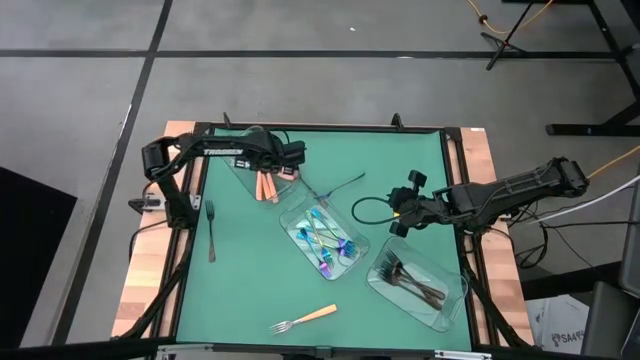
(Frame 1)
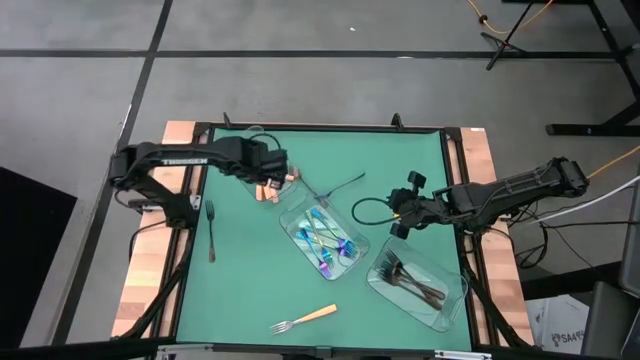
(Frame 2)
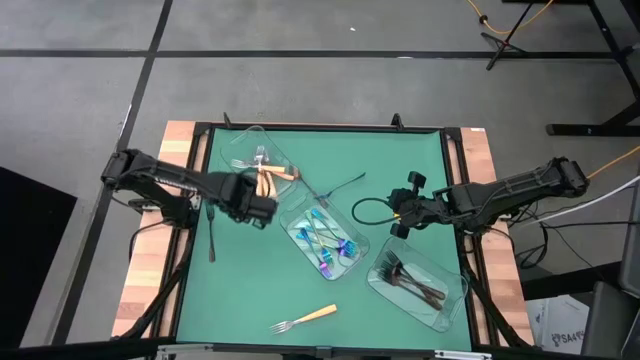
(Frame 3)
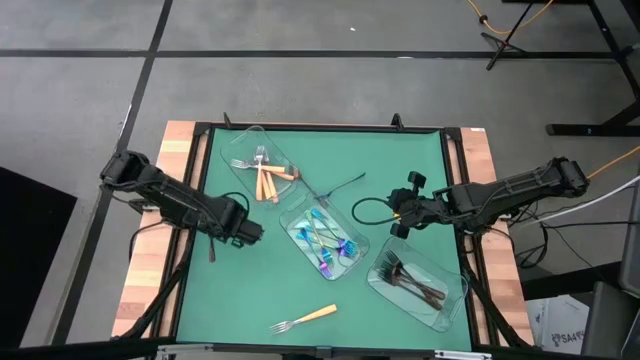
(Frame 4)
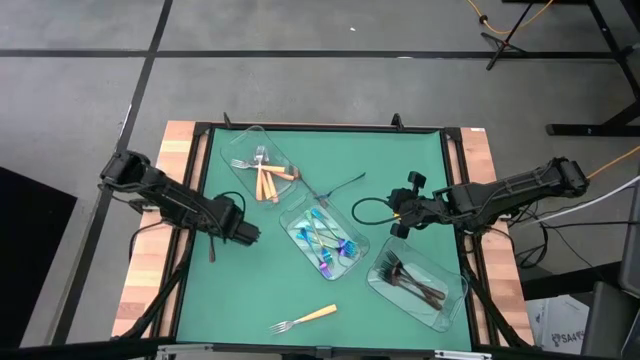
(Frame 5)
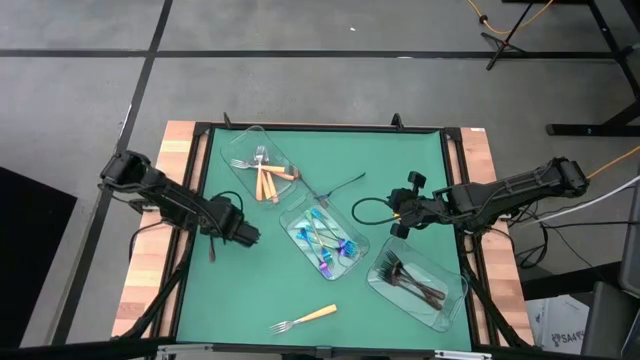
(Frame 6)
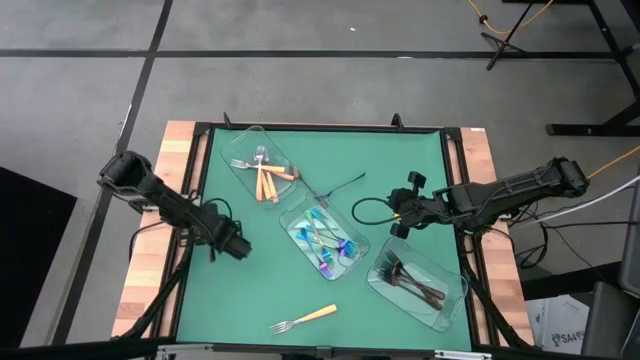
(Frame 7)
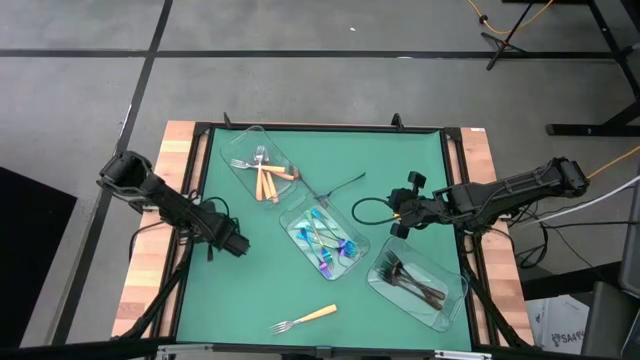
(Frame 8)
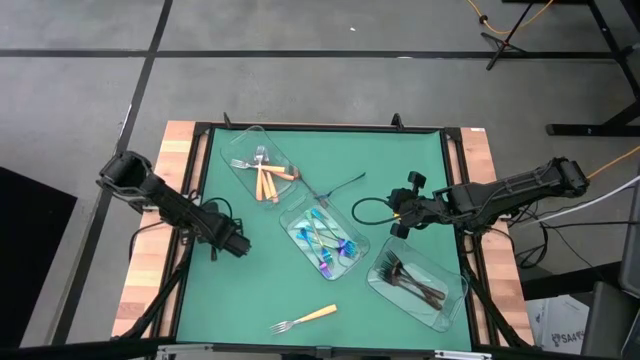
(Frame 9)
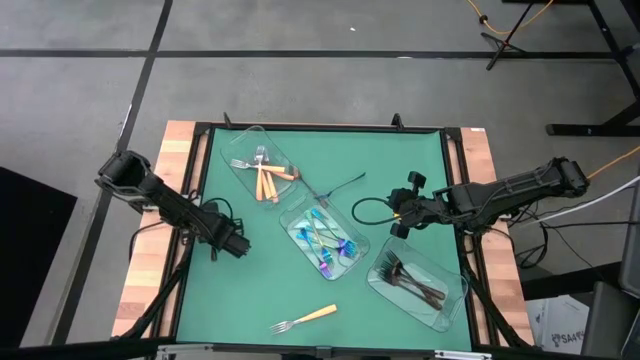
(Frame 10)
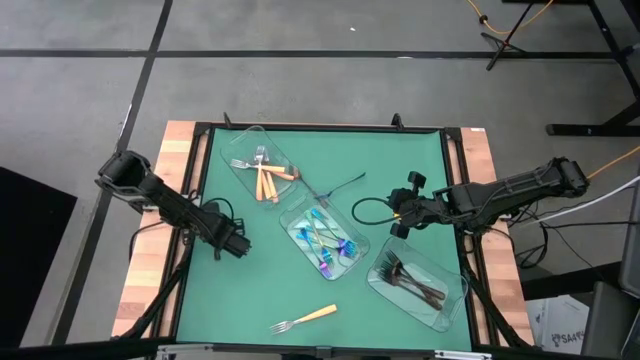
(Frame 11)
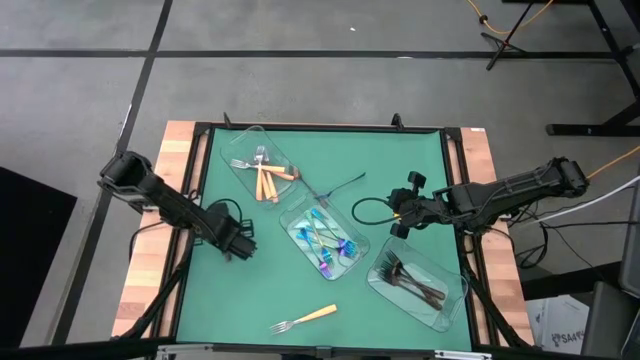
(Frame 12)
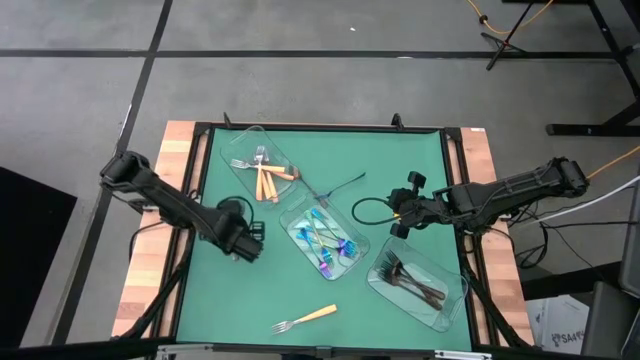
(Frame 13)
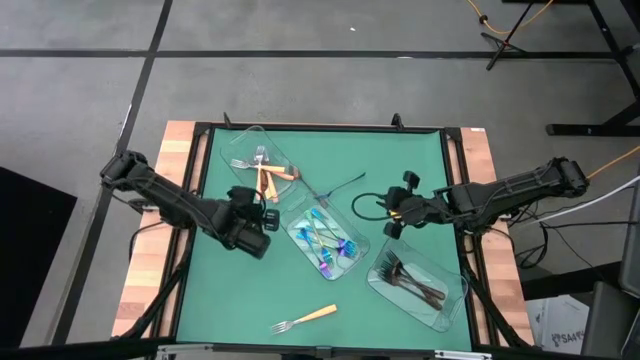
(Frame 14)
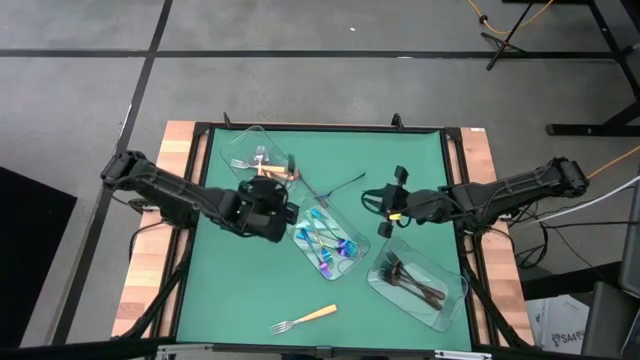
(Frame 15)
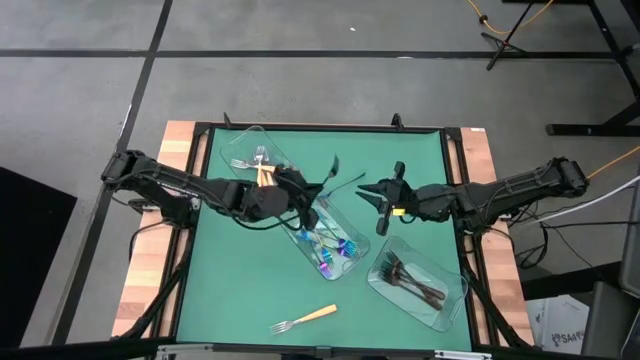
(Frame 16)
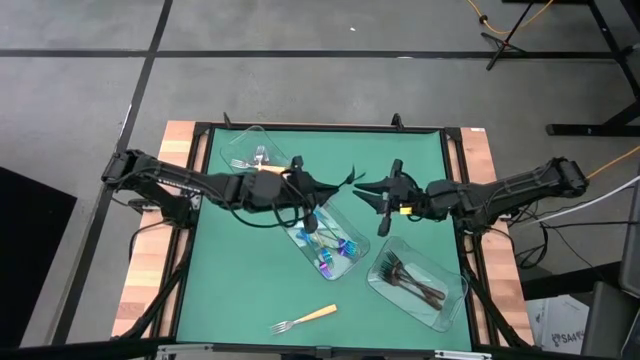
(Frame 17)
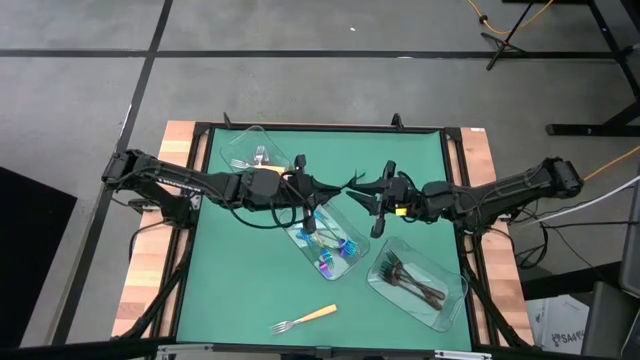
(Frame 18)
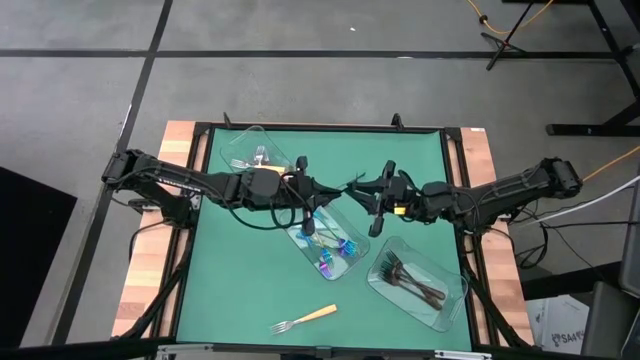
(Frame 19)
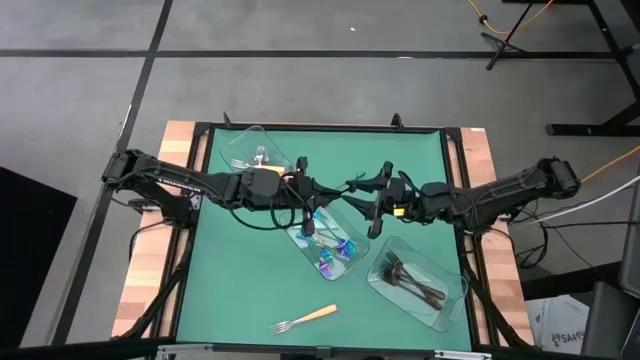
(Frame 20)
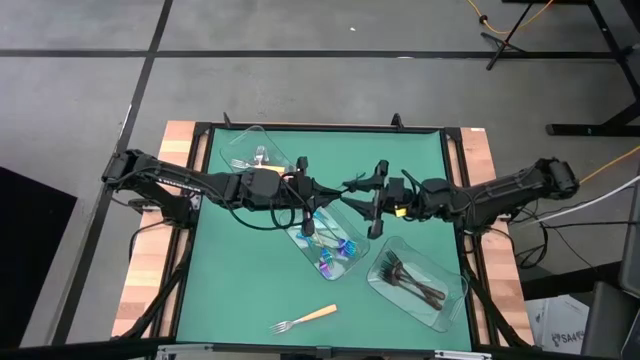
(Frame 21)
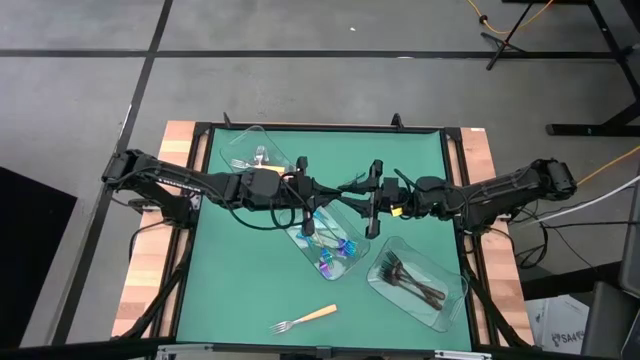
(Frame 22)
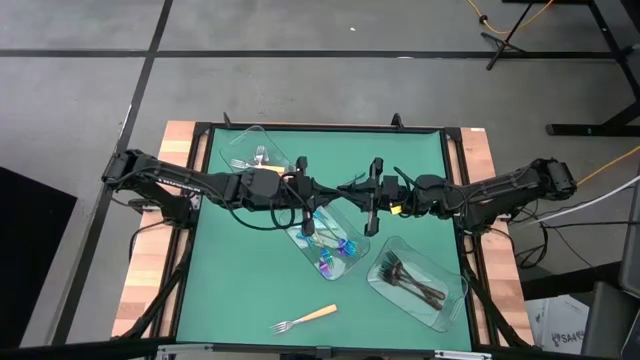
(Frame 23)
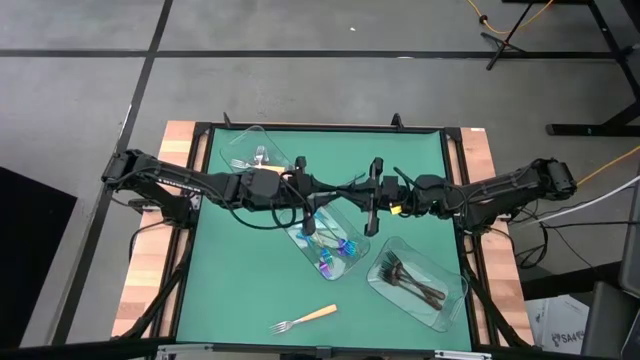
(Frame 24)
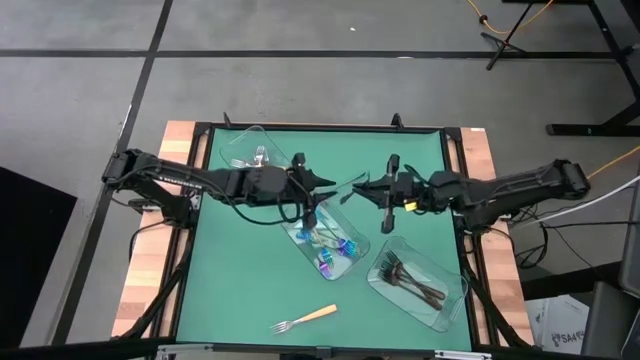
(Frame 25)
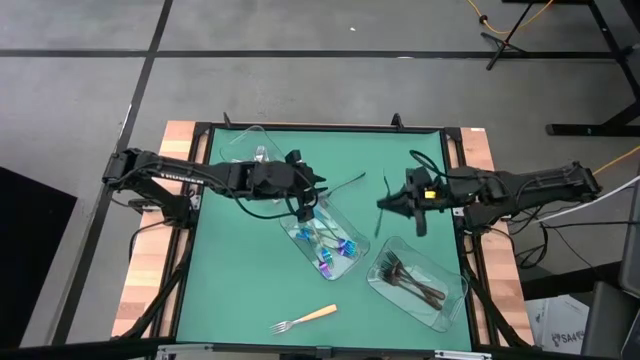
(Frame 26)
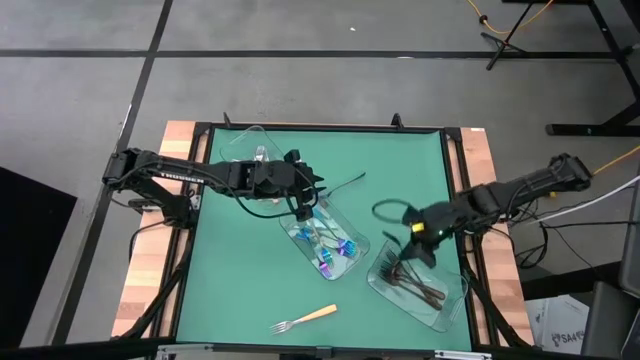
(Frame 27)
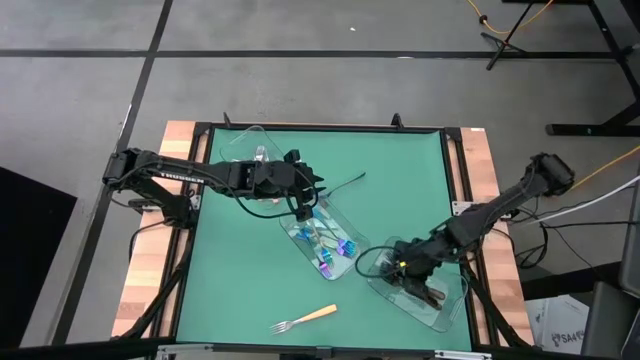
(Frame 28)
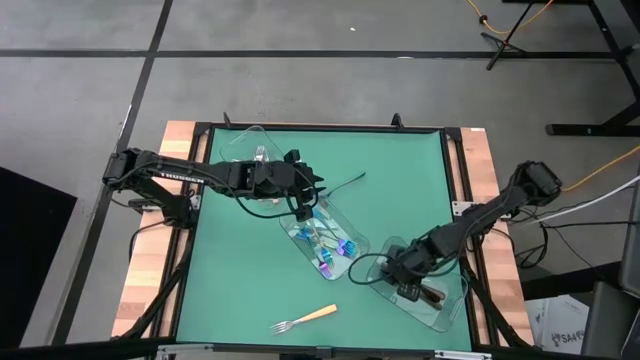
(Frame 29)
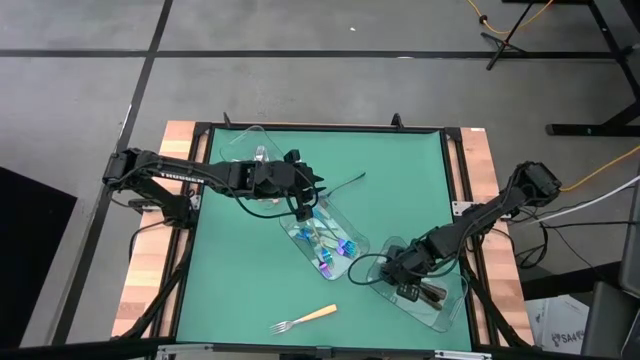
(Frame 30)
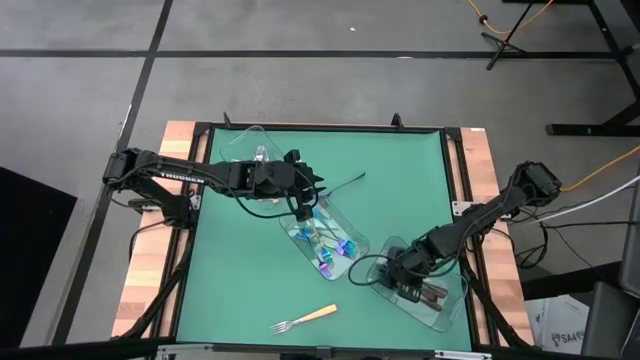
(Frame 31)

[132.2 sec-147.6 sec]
Task: Sort silverware by color (type)
Put black fork into the bottom transparent bin

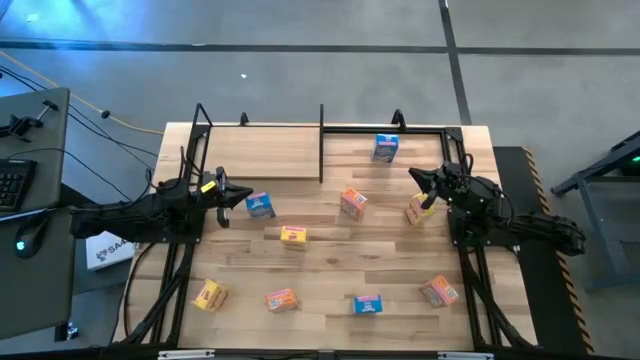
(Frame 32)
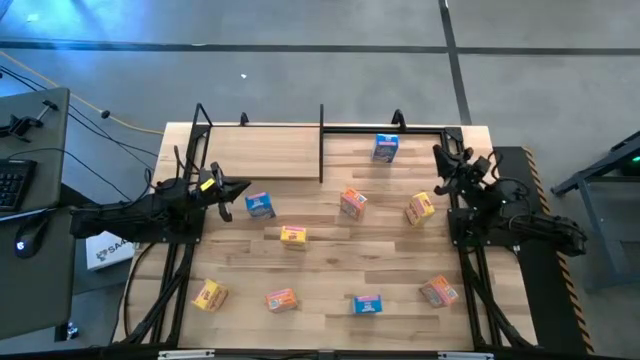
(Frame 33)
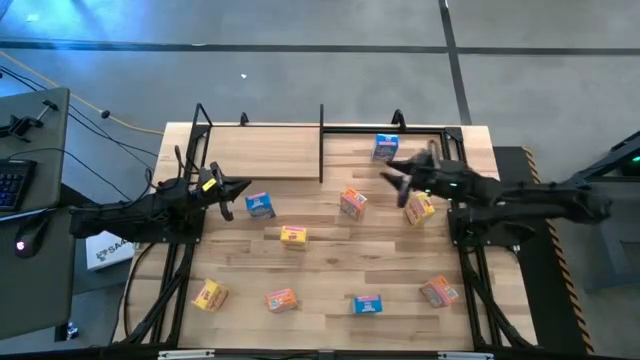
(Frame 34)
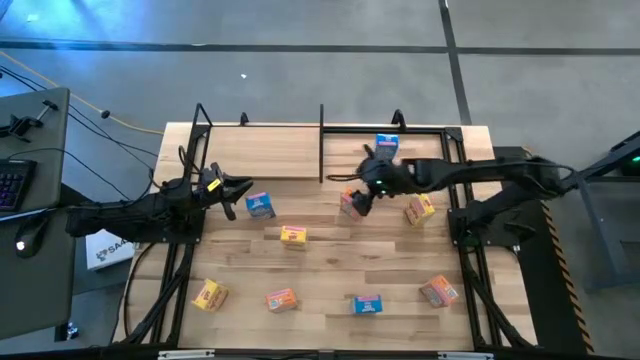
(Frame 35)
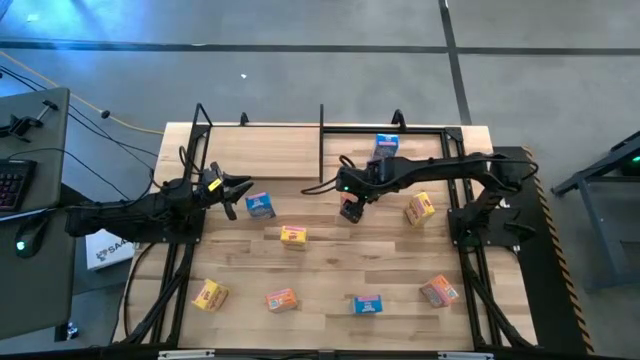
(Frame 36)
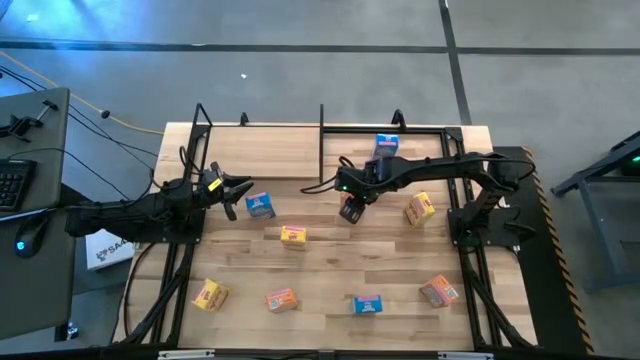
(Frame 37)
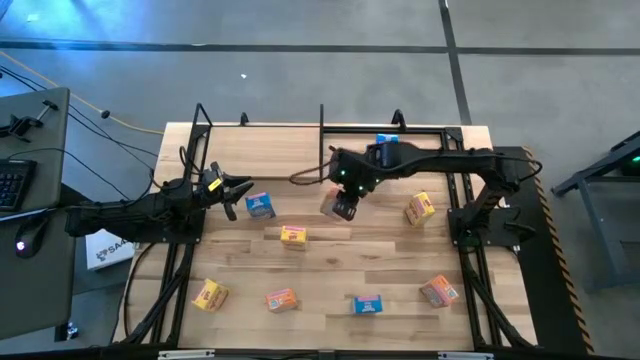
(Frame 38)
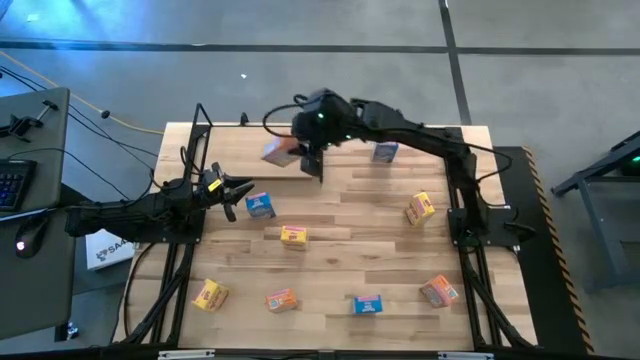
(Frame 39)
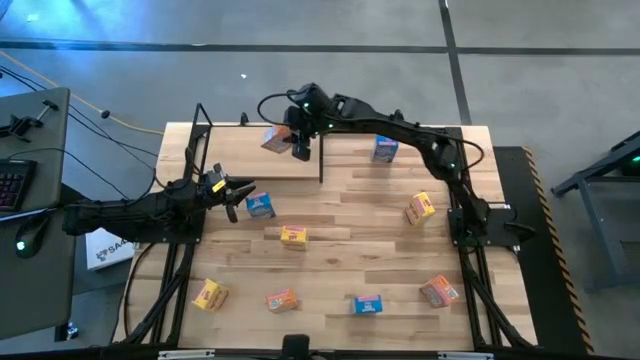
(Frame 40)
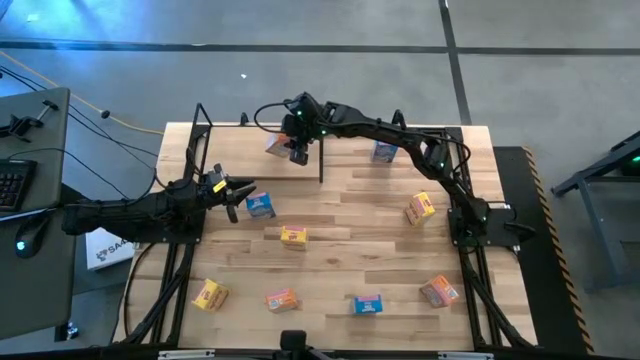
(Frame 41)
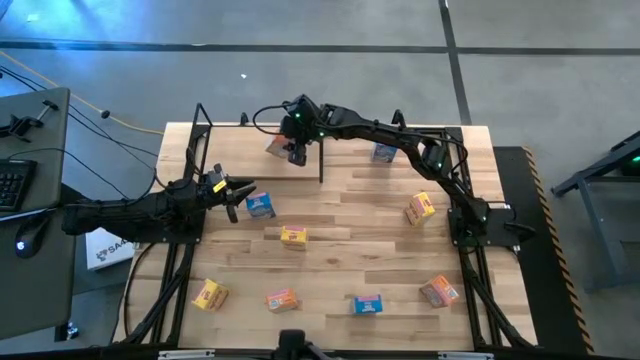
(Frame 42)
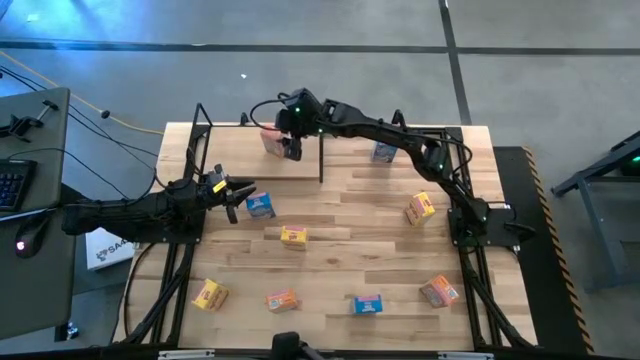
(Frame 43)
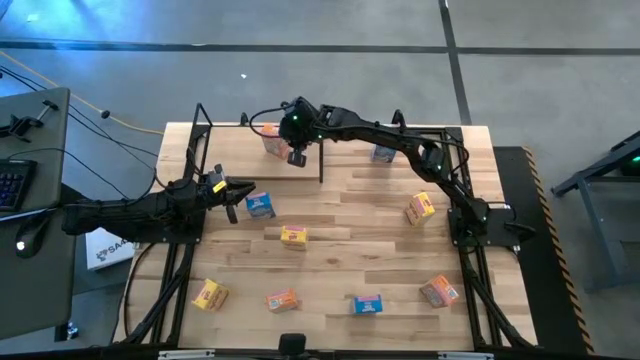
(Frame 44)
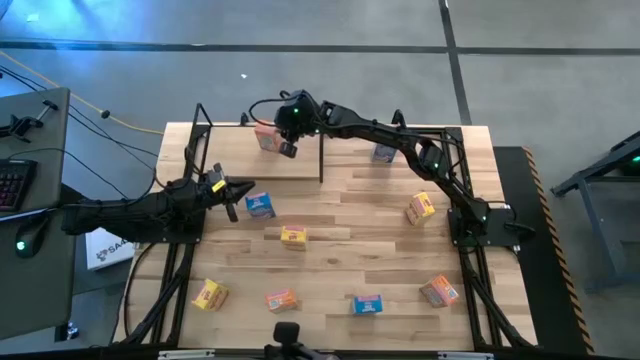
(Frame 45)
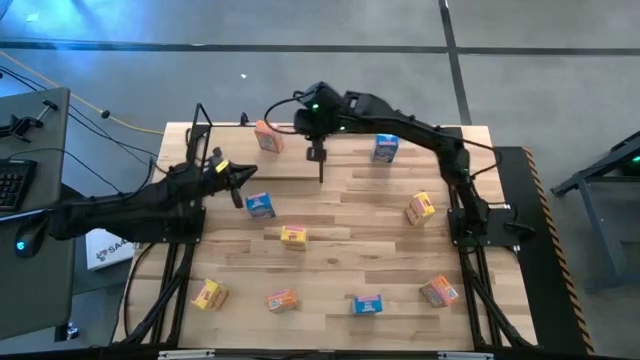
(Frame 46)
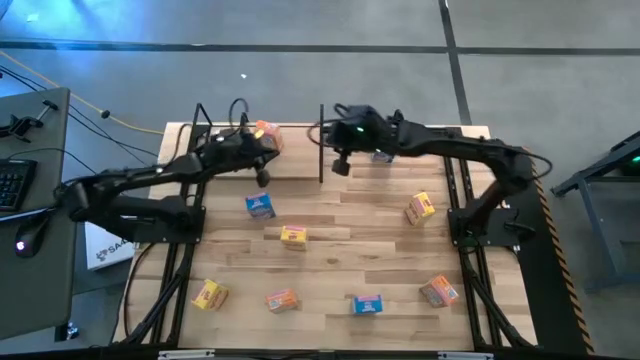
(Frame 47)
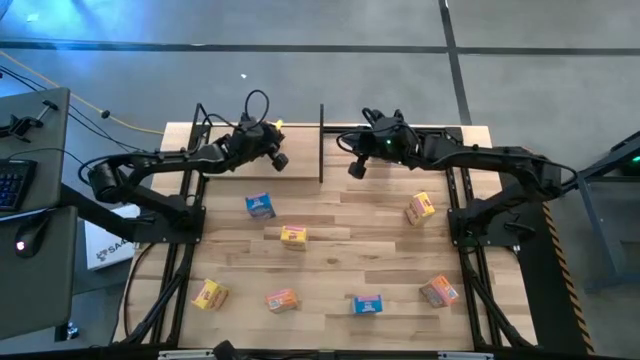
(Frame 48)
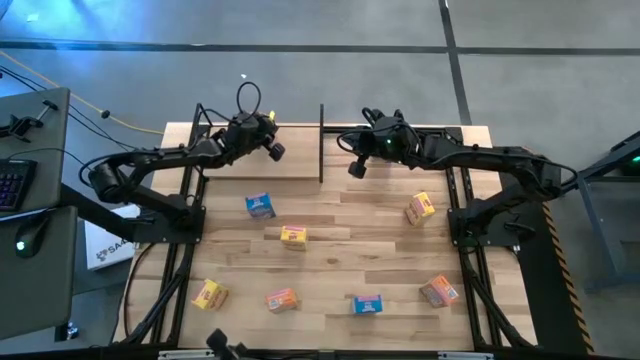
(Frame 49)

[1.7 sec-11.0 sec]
Task: Stack cereal on shelf
Put the top center orange cereal box on the shelf
